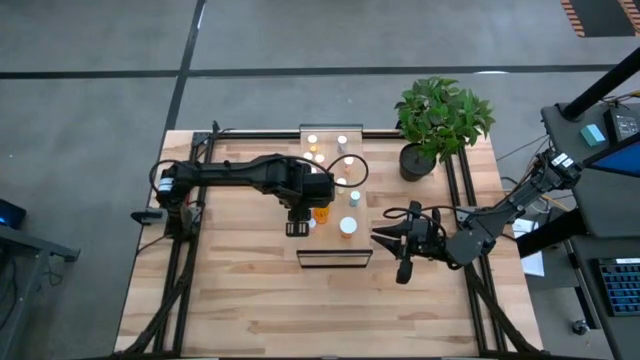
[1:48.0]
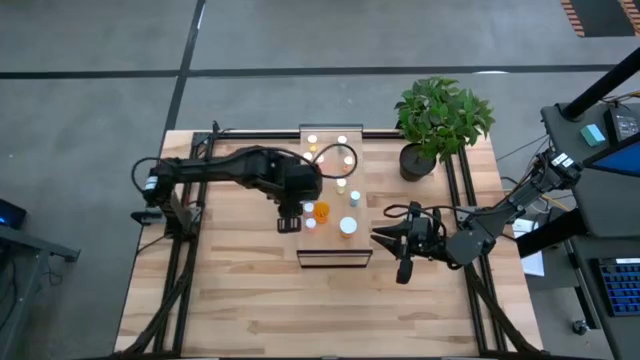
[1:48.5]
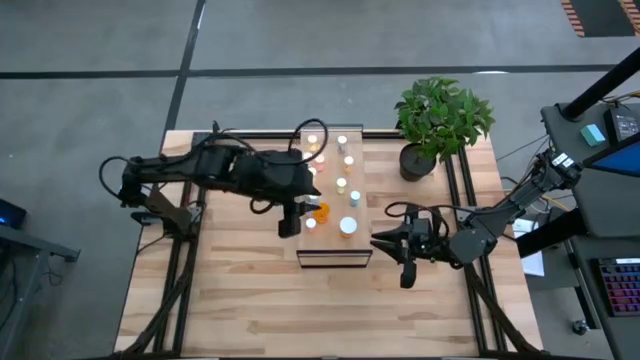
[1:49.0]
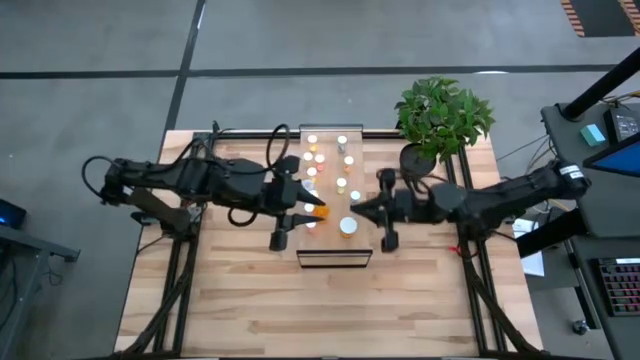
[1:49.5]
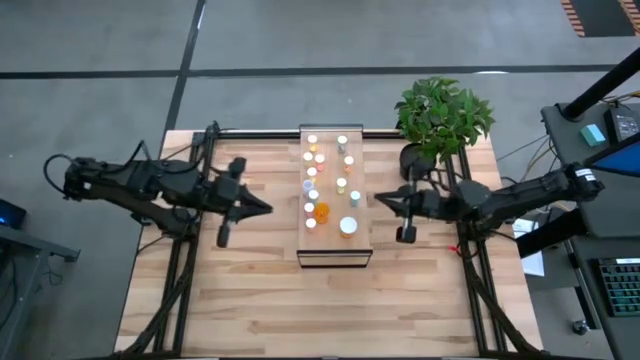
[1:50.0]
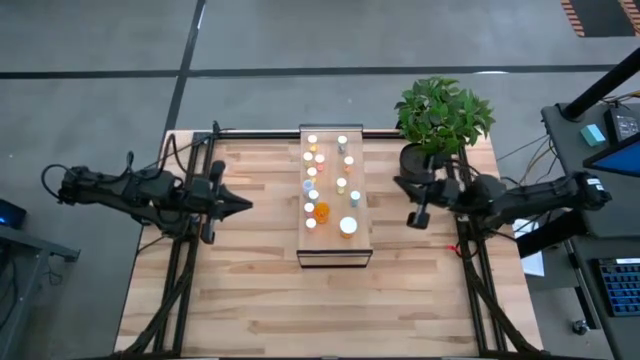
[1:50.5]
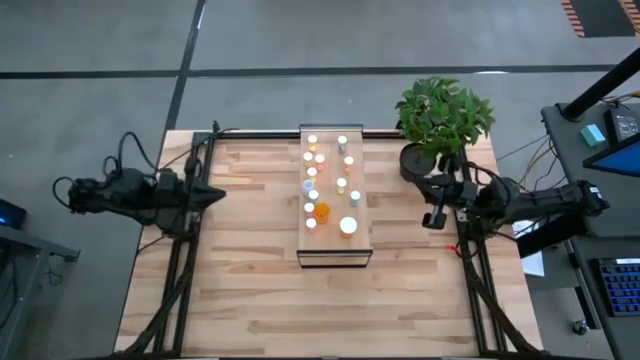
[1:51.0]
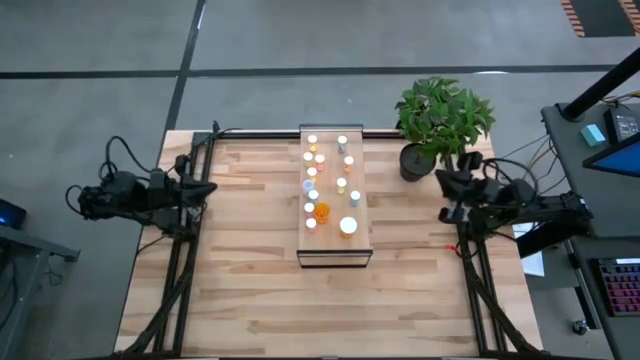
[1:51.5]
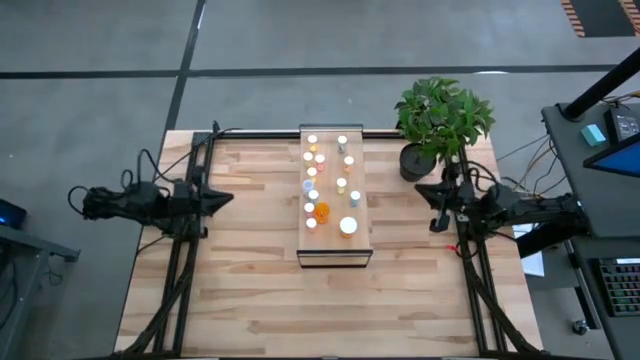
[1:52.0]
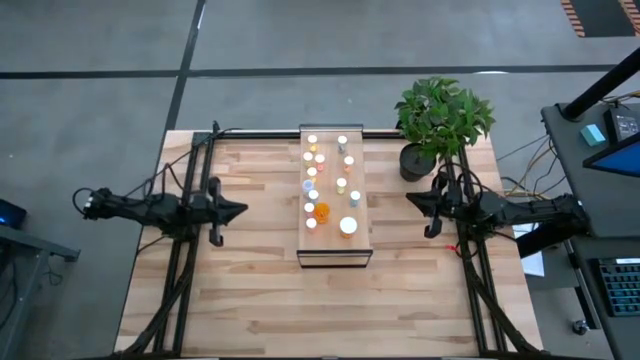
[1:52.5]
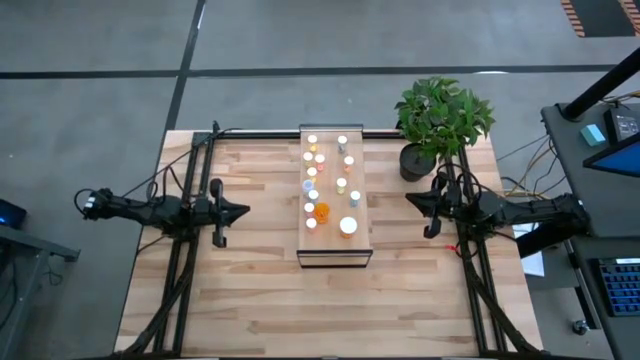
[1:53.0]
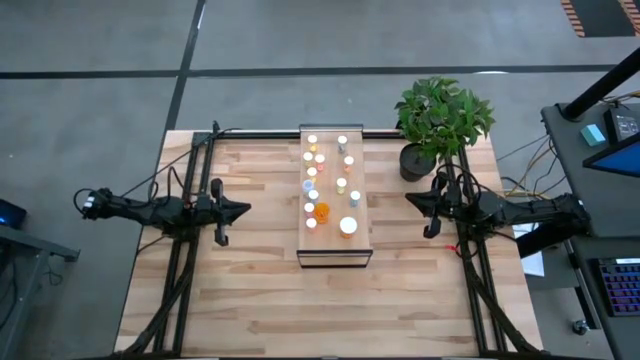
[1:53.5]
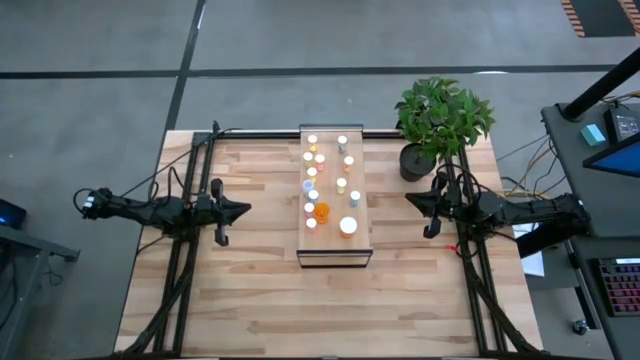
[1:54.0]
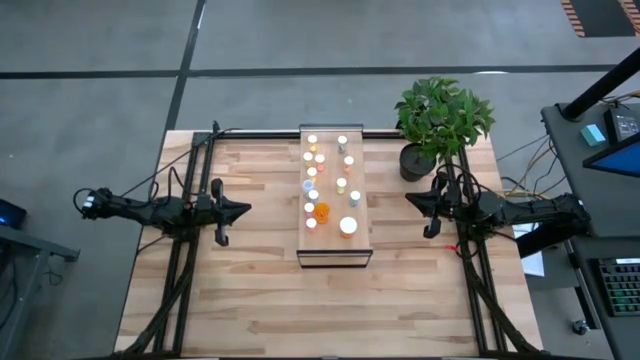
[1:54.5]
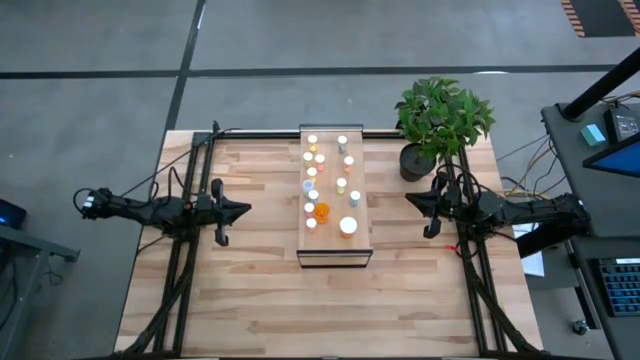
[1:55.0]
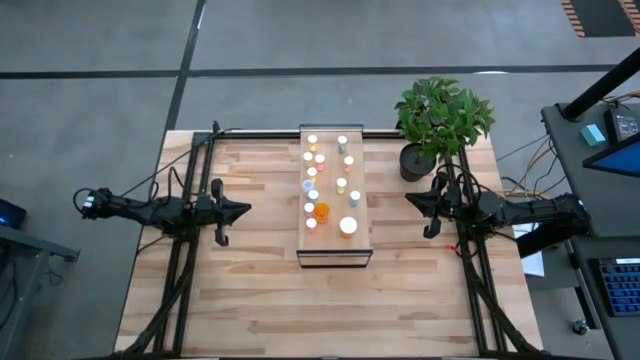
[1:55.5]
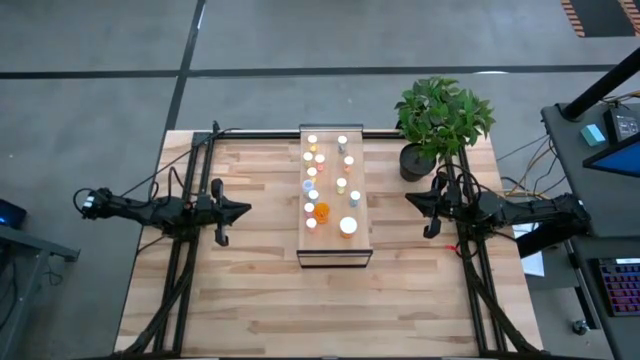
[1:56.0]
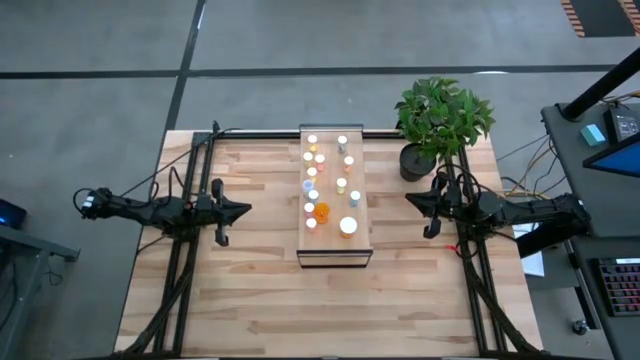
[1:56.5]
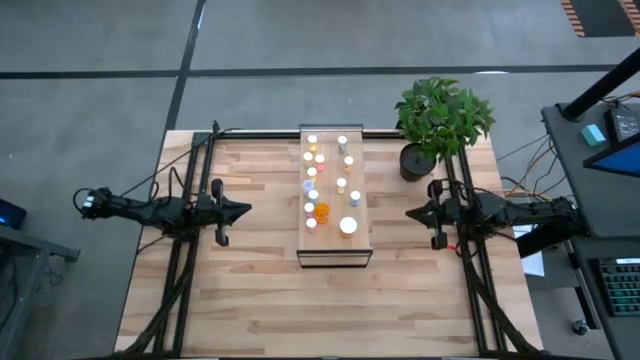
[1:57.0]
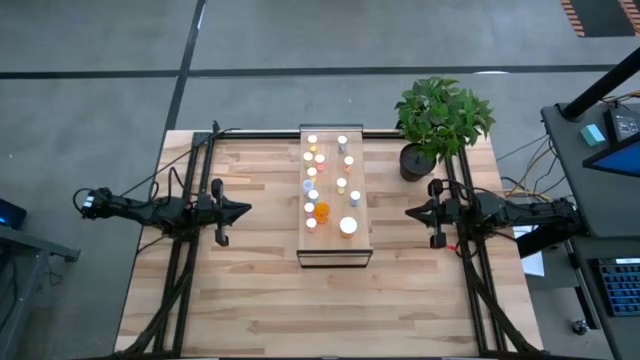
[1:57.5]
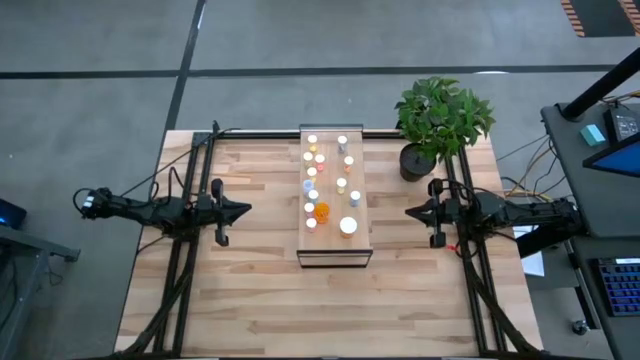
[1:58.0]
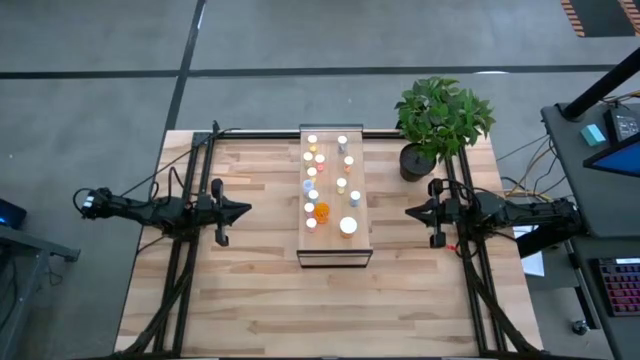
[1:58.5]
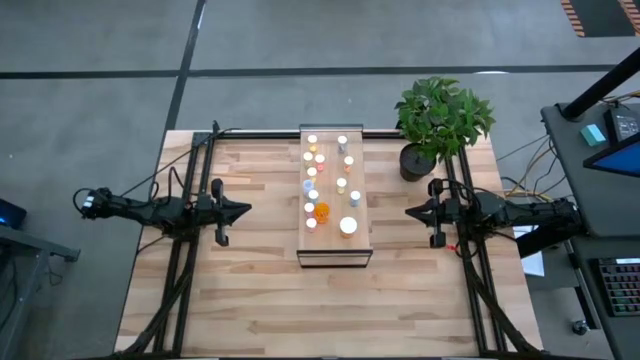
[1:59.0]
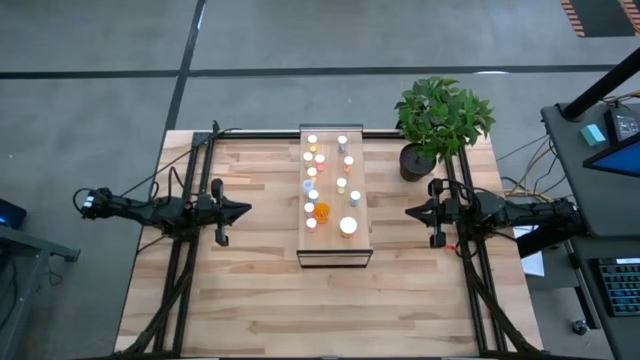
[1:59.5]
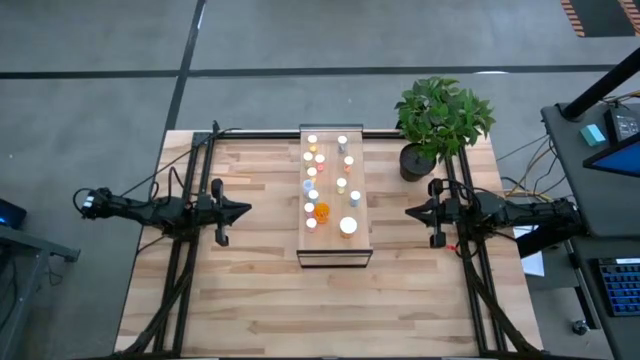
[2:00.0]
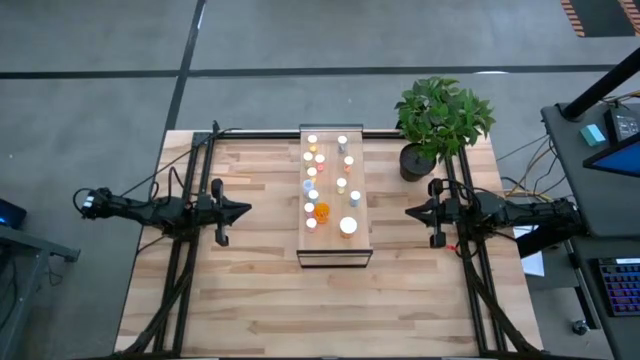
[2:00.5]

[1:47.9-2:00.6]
Task: Pick and place medicine bottles onto shelf by color
Return to Home Position

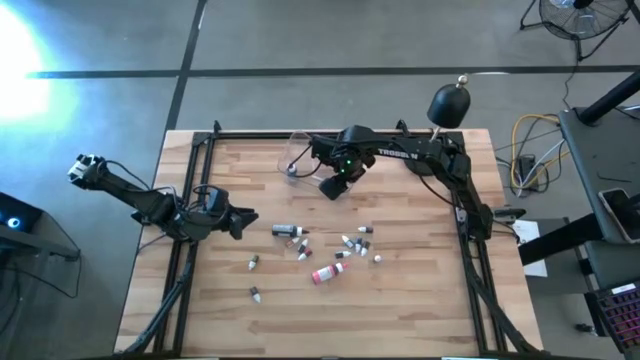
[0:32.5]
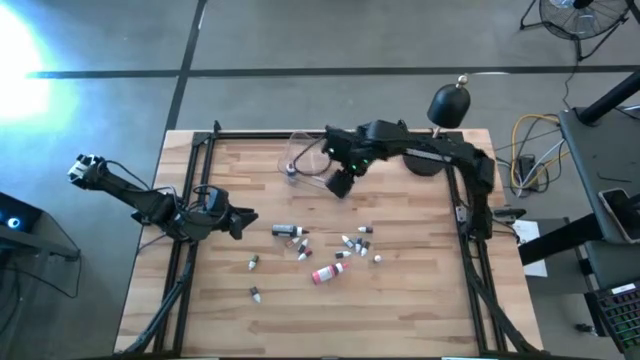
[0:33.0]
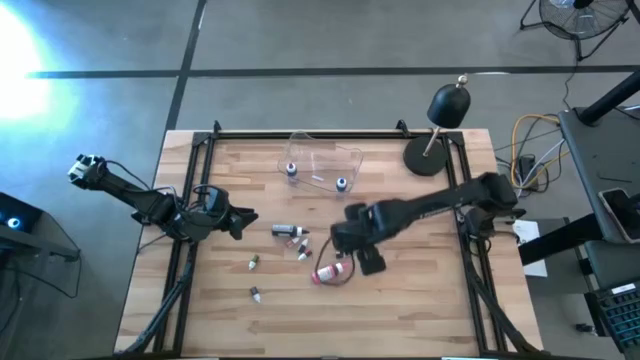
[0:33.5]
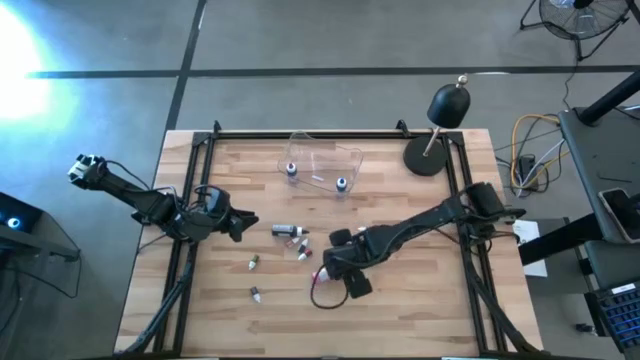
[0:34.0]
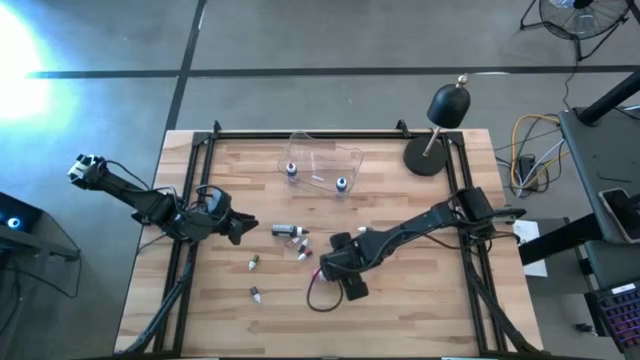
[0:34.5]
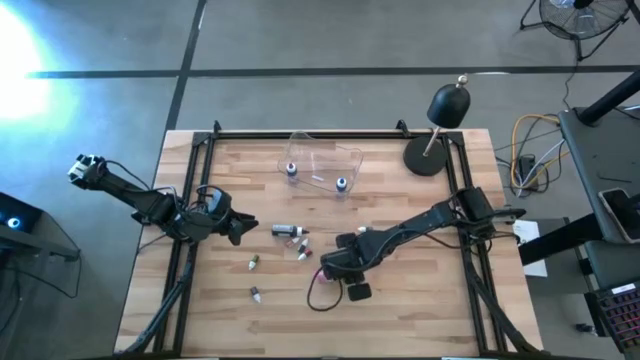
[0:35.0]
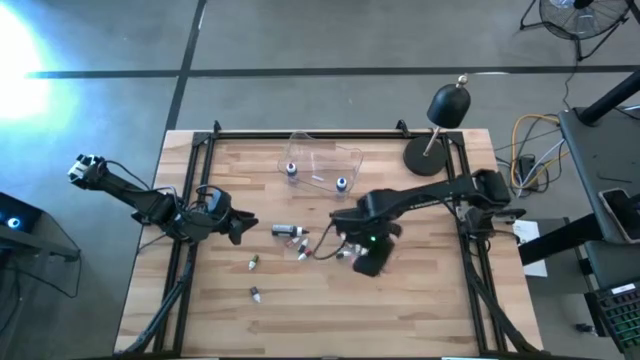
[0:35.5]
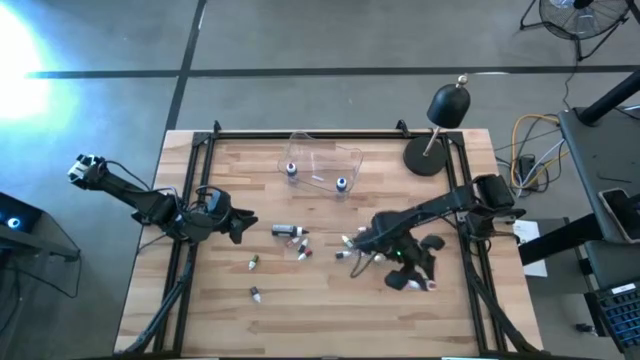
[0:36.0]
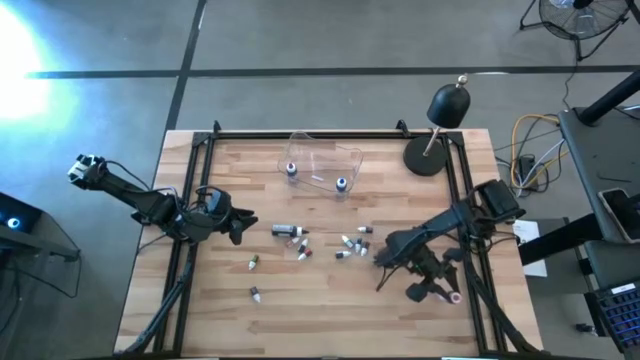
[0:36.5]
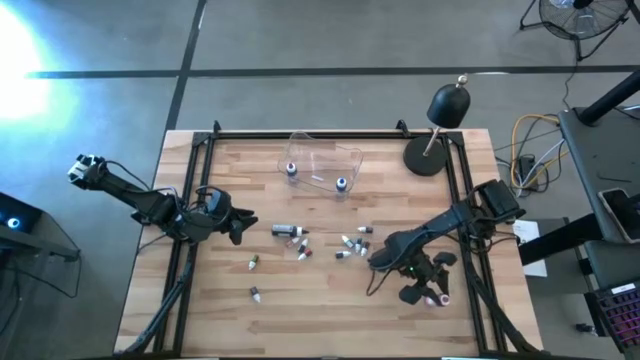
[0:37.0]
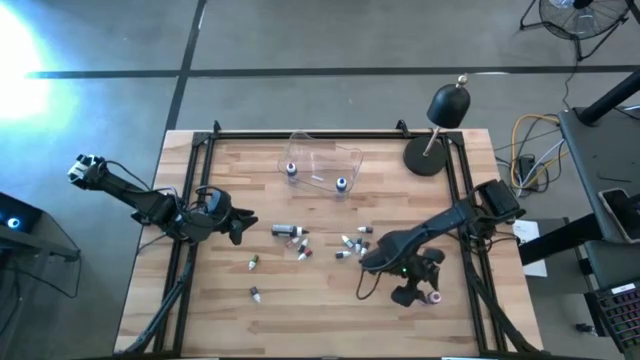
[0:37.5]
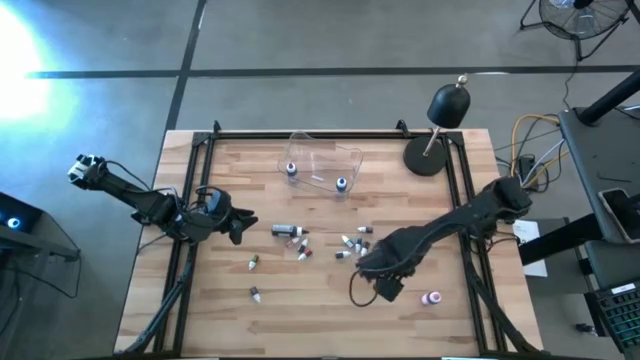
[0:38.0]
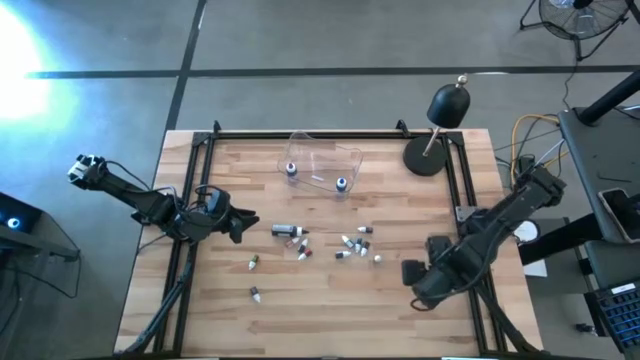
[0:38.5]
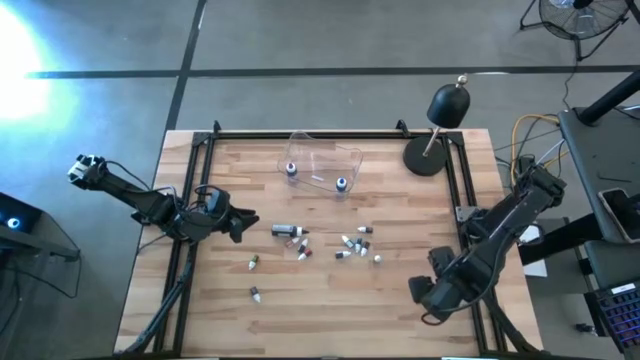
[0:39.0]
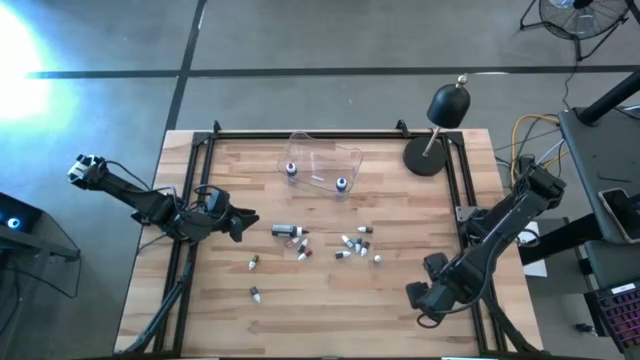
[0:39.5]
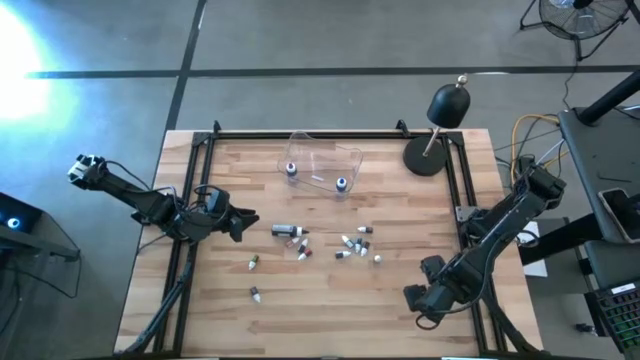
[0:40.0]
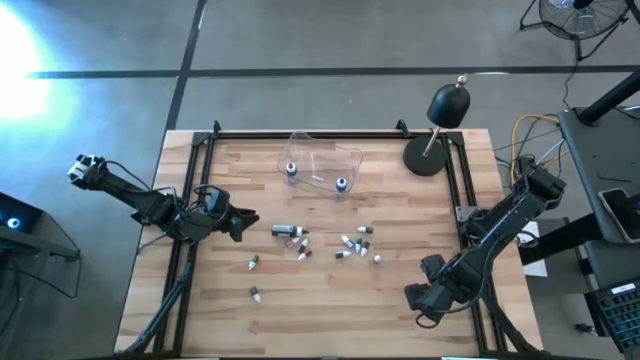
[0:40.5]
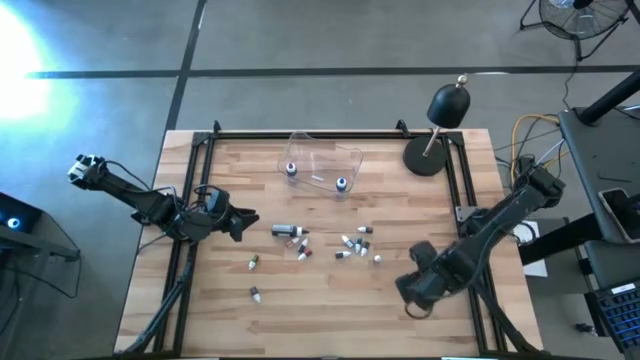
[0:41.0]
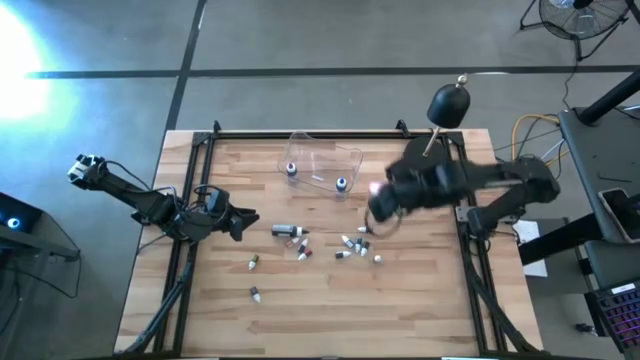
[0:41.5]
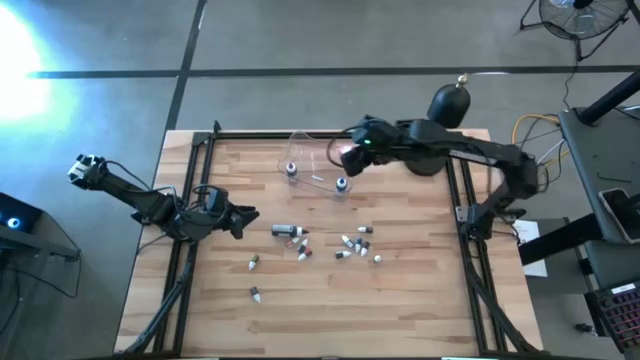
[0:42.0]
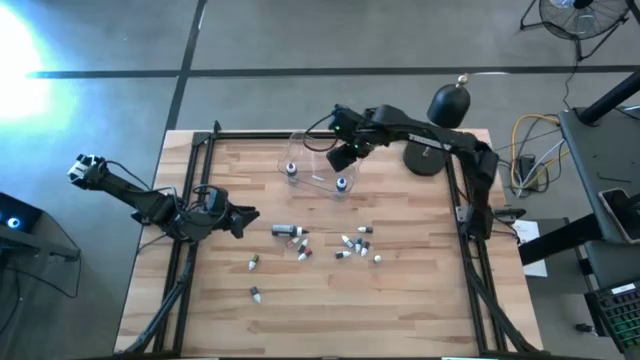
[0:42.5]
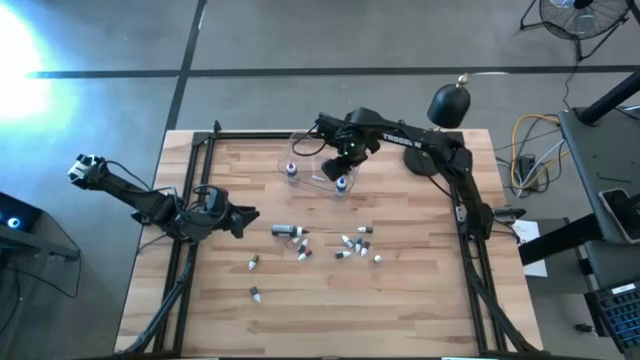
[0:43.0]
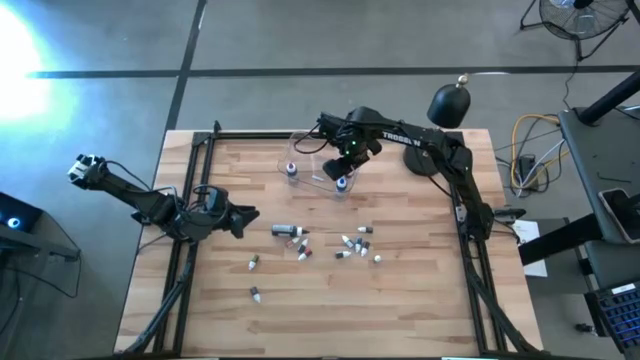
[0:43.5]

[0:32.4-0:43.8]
Task: Pick & Place food coloring
Put the large pink food coloring bottle into the transparent bin
